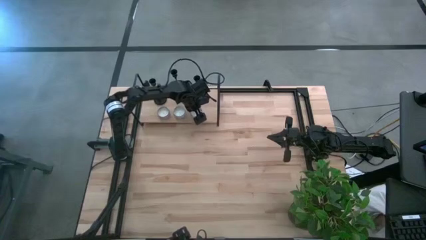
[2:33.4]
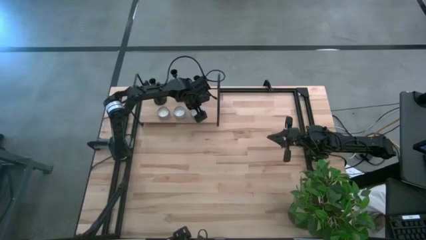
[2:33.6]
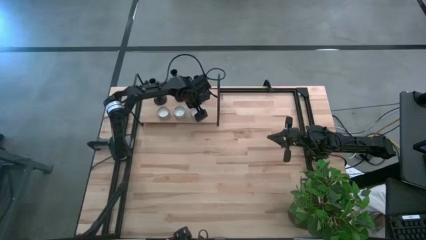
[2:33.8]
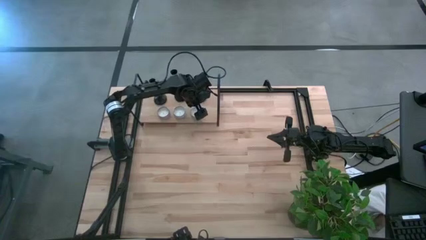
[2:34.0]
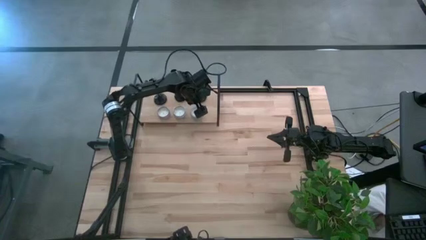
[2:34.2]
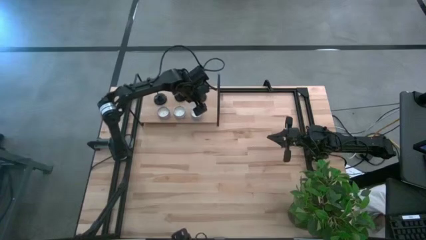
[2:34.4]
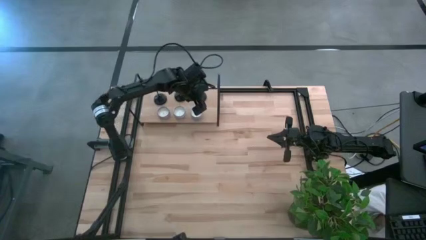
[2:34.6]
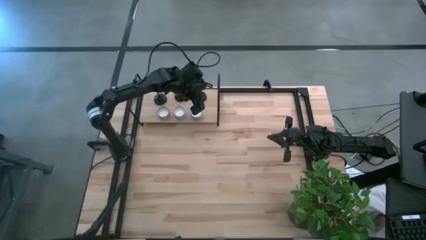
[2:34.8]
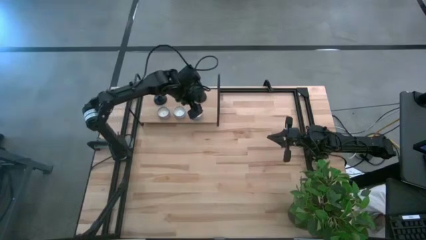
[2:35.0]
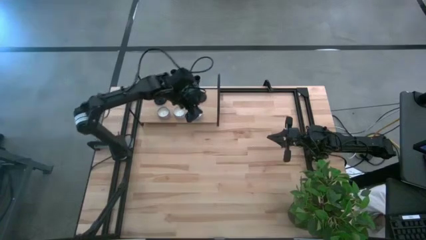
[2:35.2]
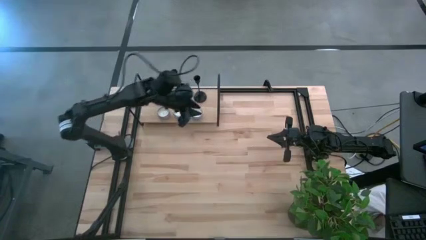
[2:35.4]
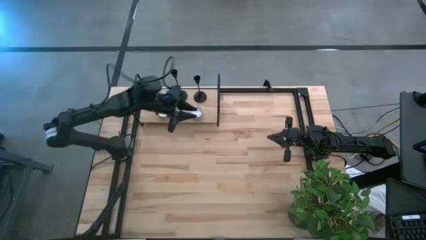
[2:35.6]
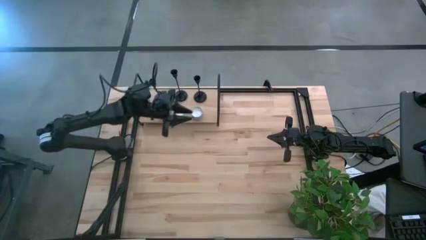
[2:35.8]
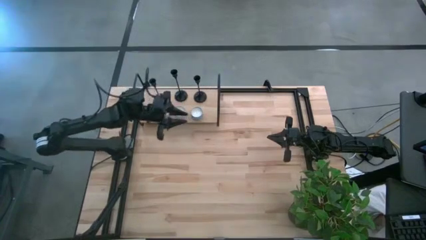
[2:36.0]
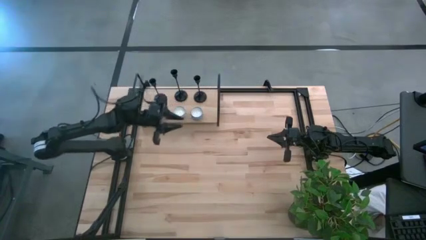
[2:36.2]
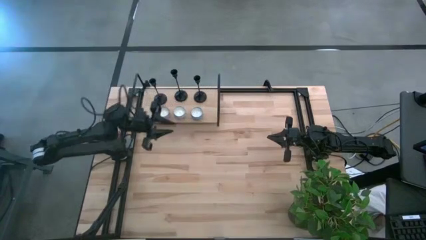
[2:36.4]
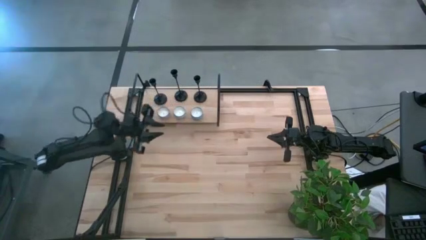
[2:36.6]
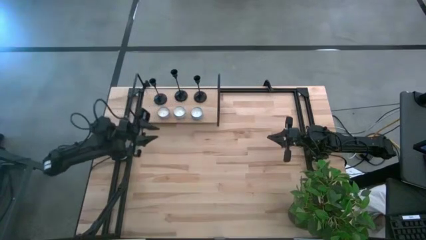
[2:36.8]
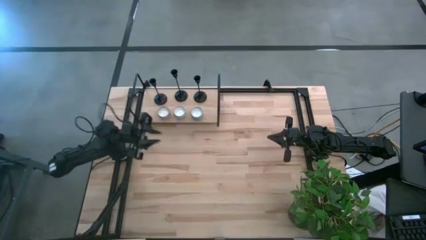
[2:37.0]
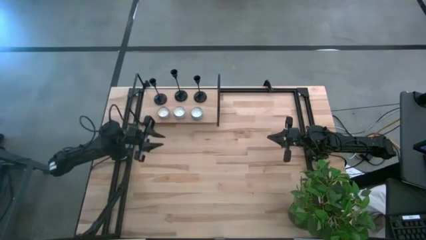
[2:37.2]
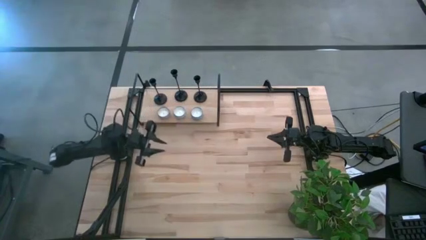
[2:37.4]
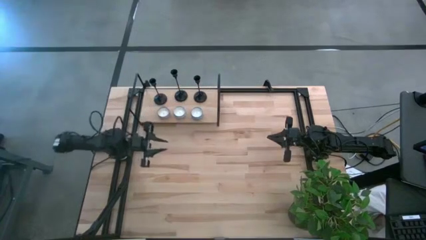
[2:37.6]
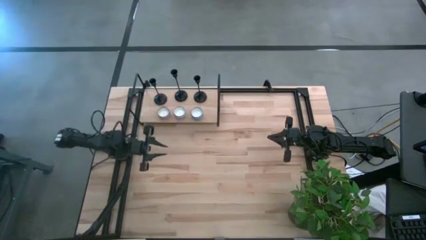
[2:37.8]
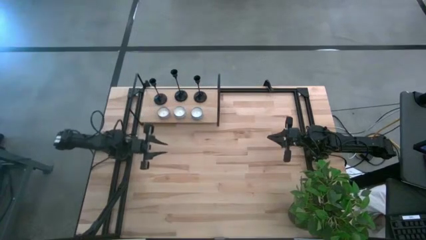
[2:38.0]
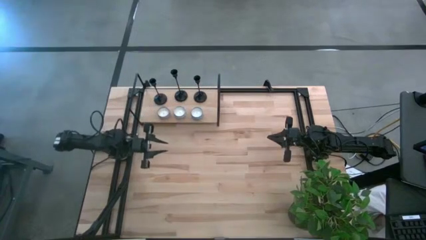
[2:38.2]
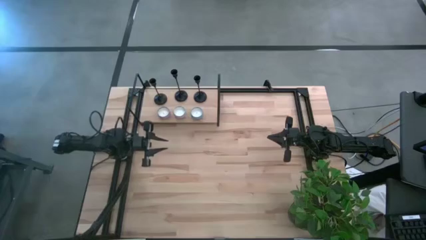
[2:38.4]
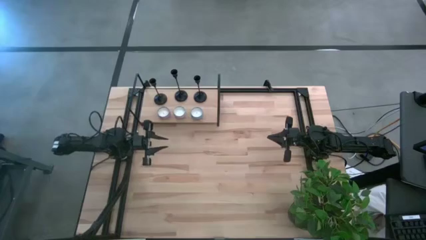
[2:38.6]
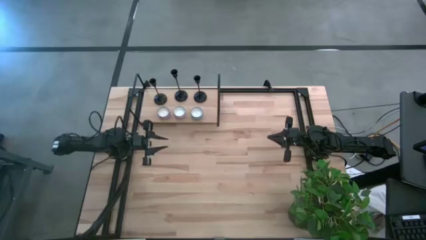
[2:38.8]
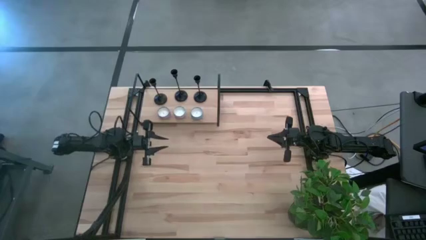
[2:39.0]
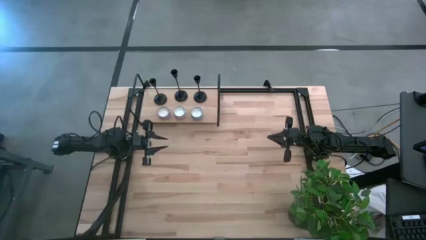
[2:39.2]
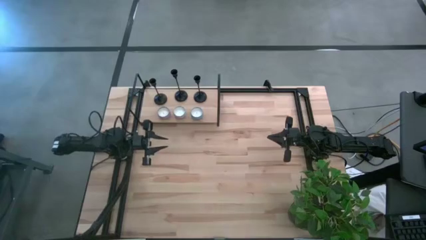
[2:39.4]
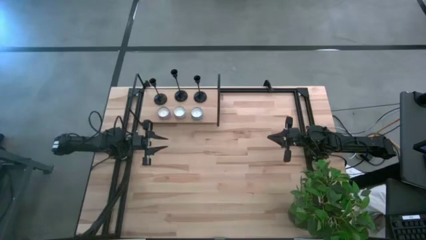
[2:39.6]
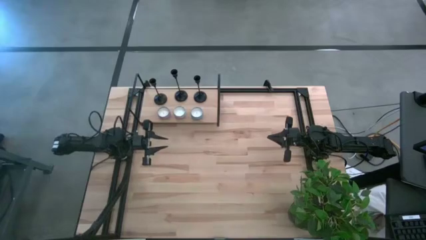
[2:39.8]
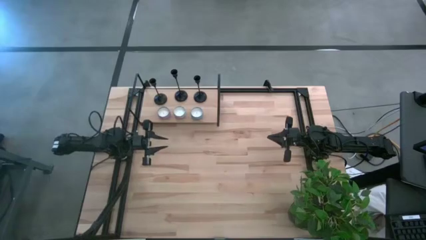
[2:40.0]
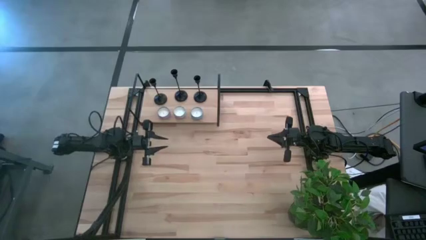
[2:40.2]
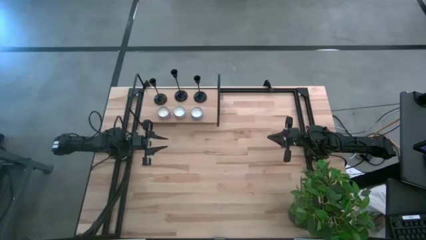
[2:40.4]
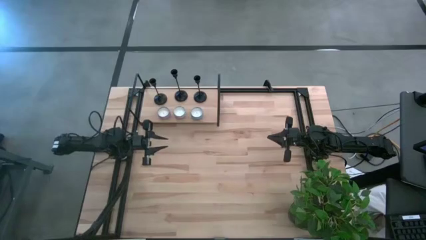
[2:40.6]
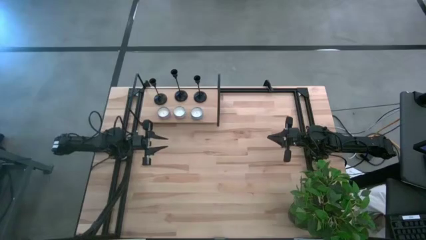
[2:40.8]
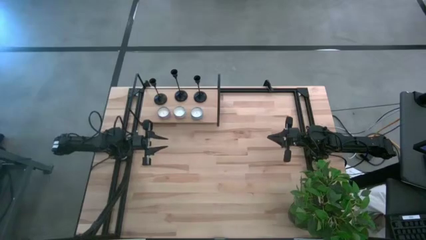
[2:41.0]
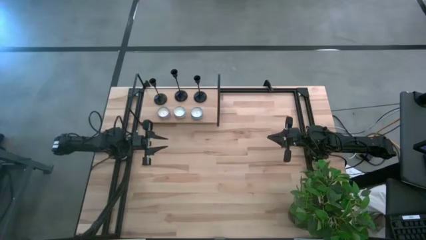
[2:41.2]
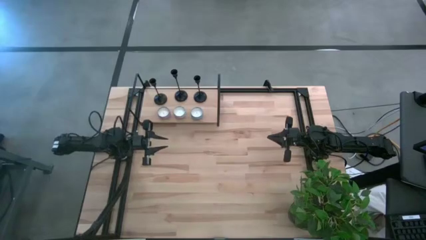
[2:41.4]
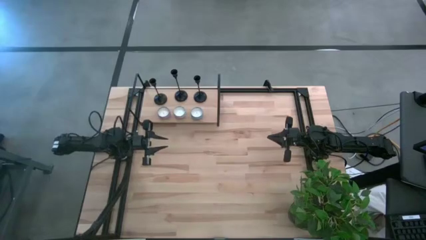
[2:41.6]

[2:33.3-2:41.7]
Task: Pick & Place candle stick holders
Return to Home Position

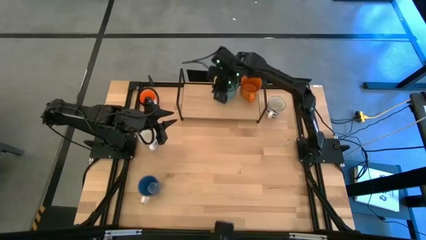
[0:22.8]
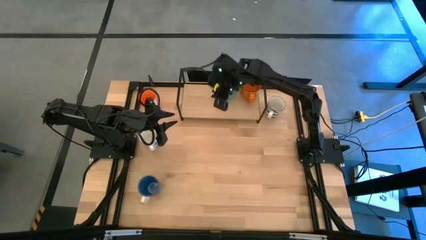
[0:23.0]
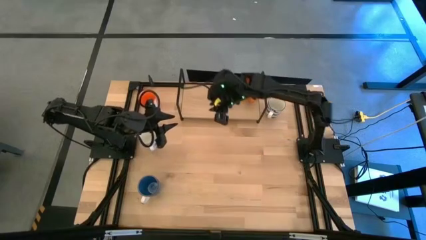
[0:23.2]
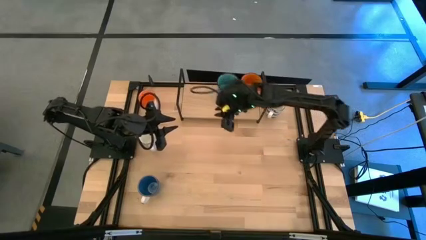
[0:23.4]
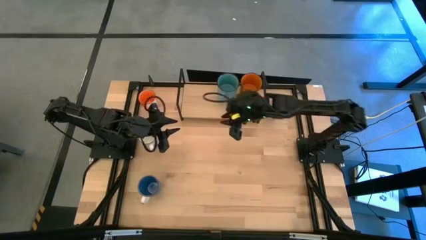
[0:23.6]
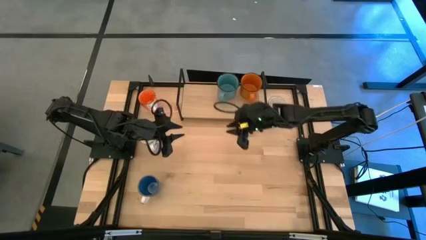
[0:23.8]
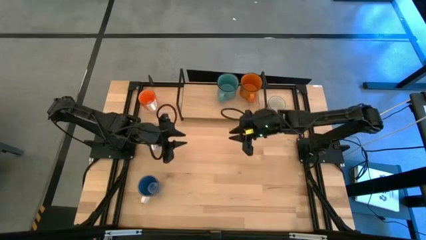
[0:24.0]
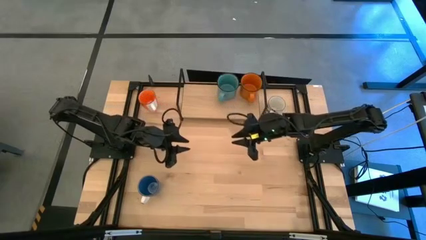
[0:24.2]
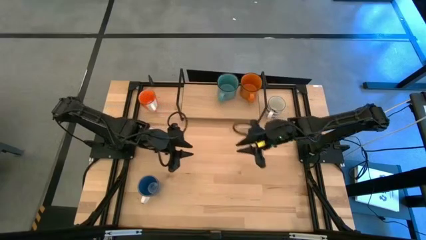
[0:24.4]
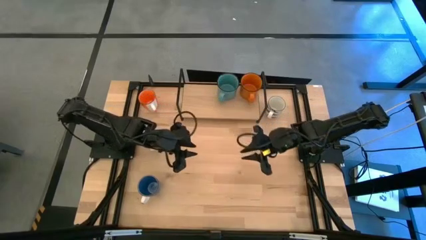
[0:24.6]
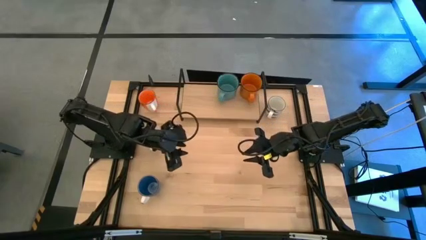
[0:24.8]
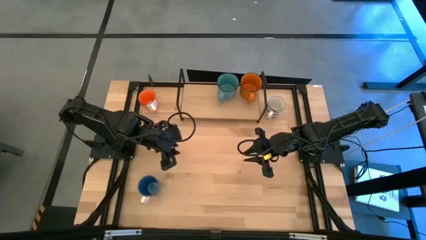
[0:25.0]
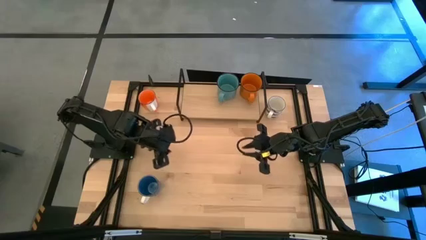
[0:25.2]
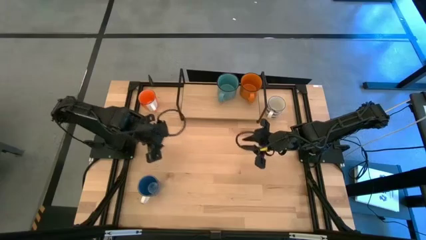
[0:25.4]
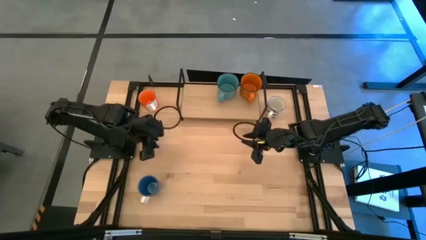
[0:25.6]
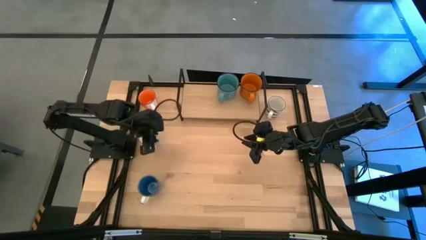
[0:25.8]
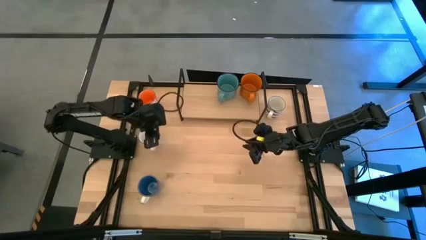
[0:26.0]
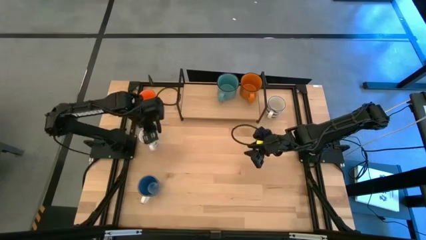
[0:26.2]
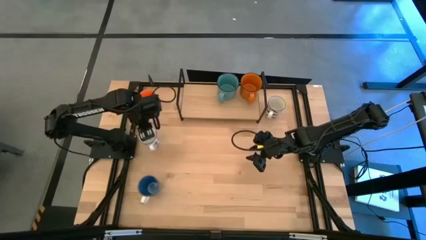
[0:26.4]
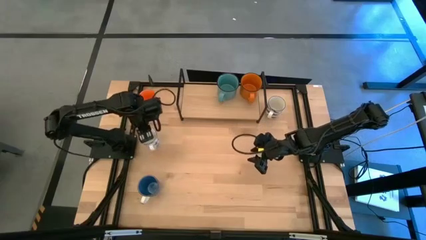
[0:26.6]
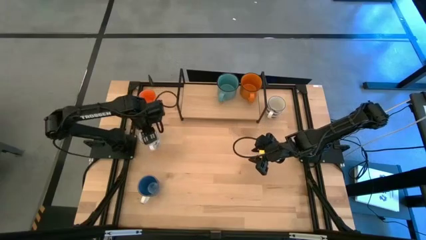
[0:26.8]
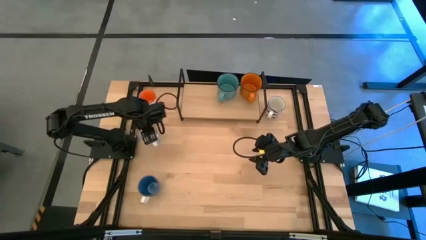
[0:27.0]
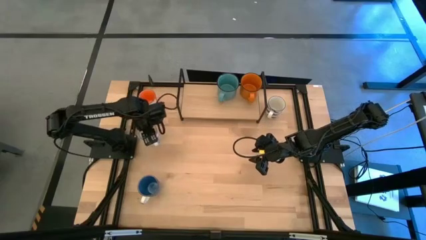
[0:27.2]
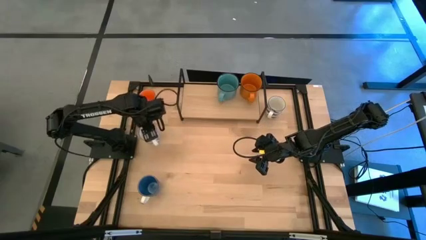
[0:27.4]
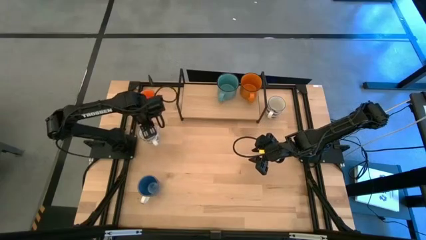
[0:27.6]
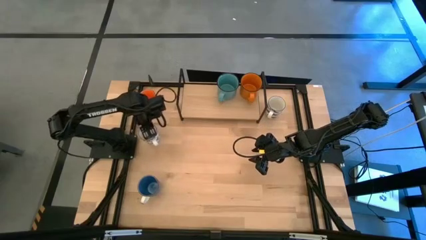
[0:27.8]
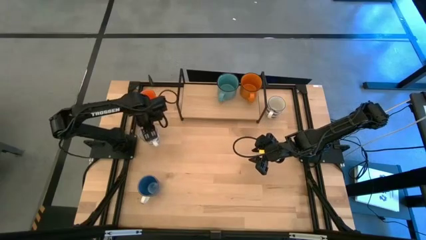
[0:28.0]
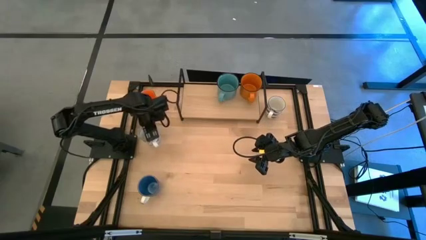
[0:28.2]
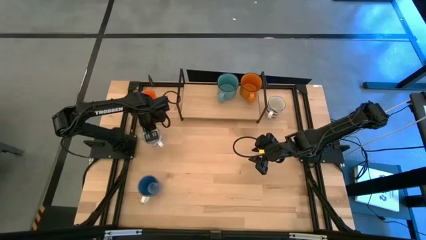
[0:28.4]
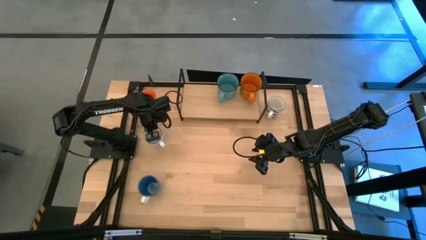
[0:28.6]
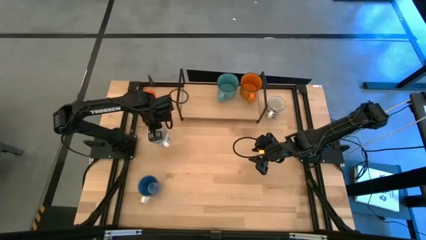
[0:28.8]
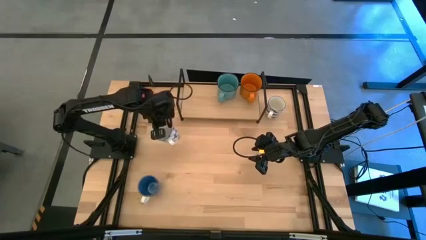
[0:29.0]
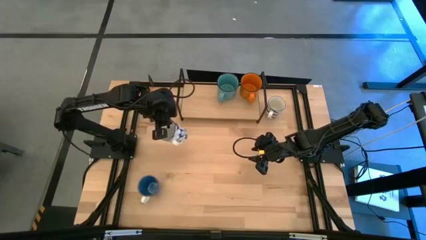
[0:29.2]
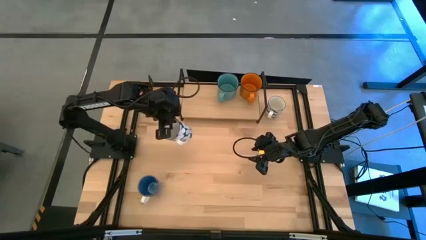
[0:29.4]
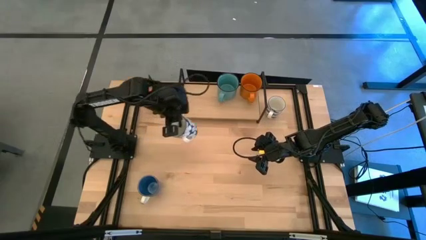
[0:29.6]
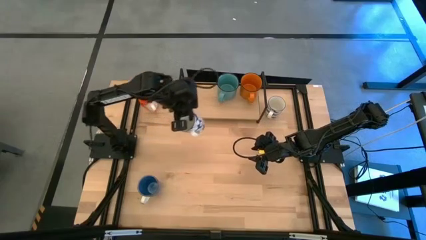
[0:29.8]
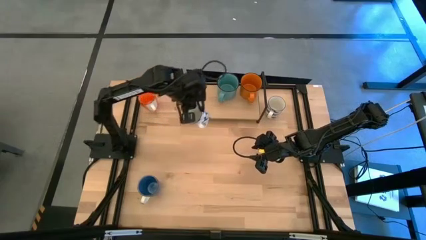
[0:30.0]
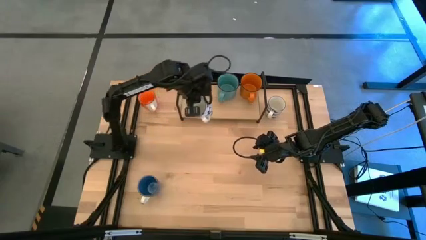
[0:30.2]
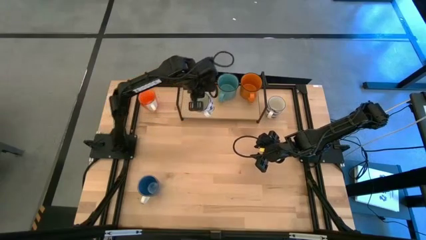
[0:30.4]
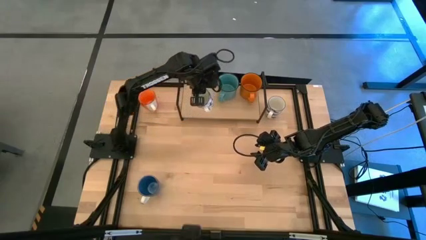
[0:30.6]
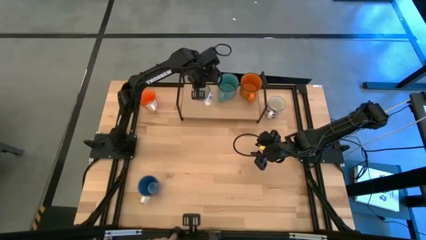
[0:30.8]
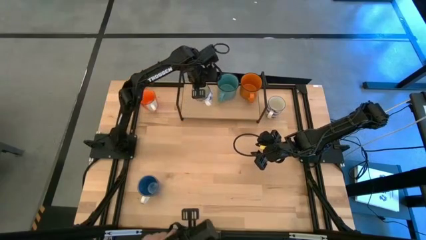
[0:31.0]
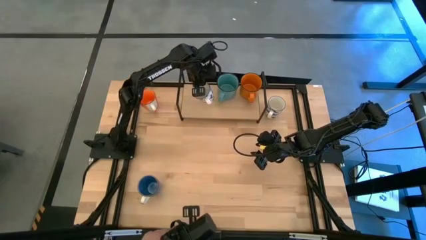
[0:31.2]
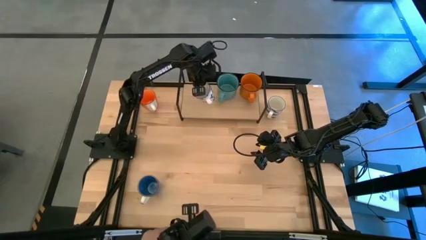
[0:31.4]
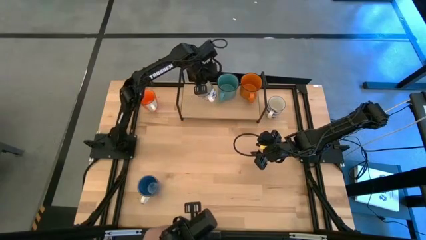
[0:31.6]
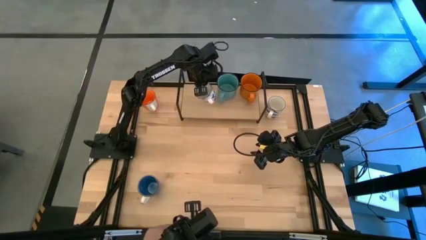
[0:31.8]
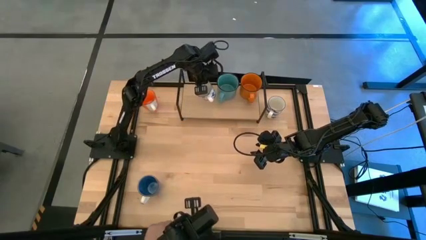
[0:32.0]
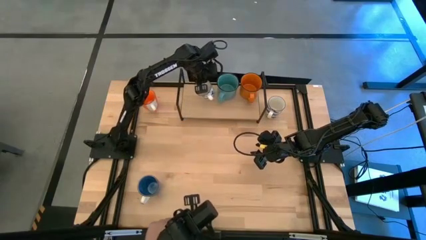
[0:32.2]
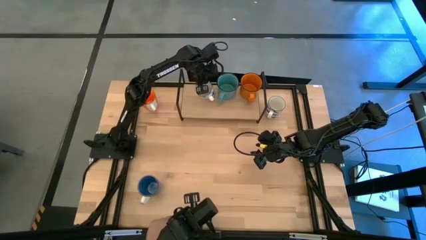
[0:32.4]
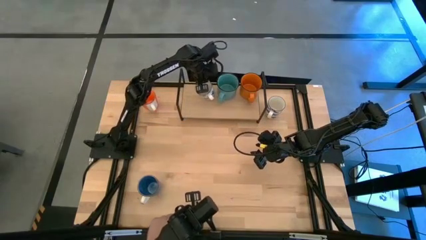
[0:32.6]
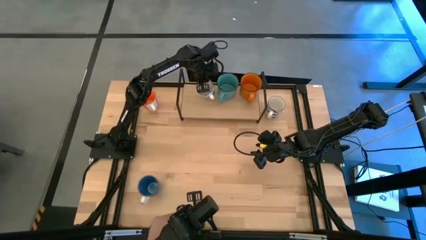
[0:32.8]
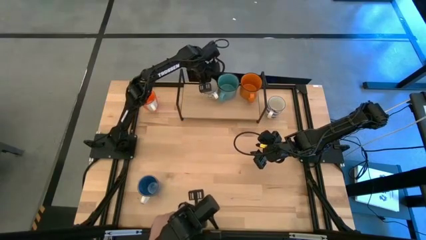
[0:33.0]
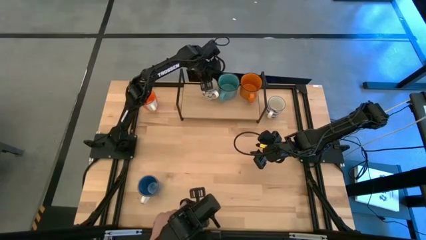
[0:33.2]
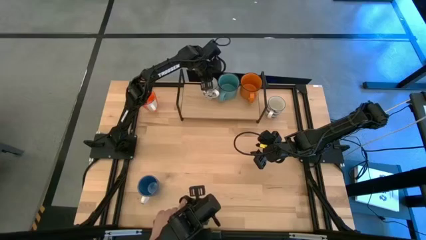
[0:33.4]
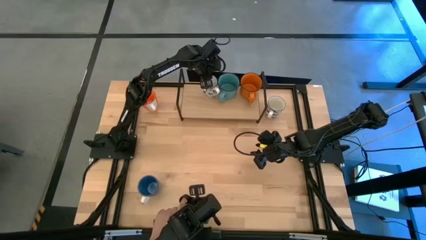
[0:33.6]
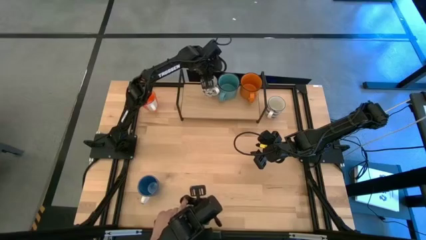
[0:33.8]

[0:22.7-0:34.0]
Task: Place coffee mugs
Put the bottom blue-white mug on the shelf
